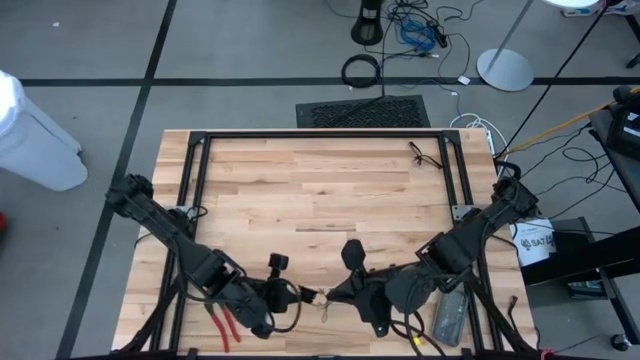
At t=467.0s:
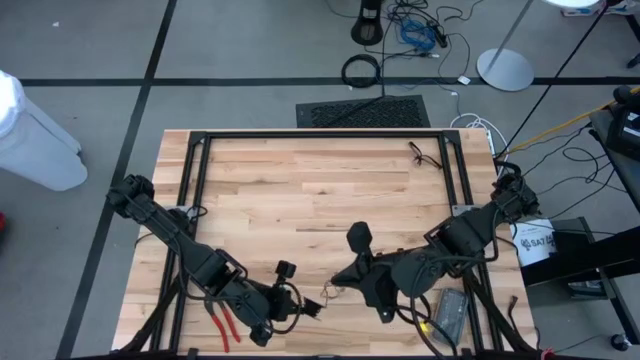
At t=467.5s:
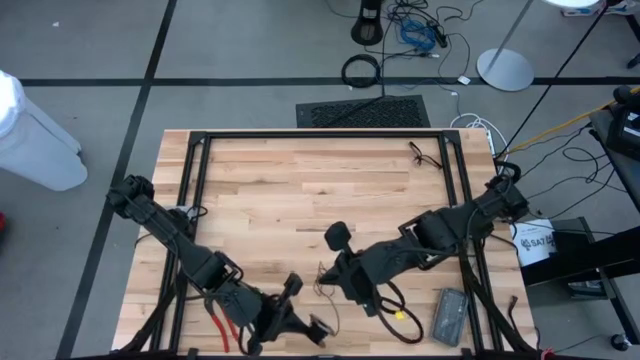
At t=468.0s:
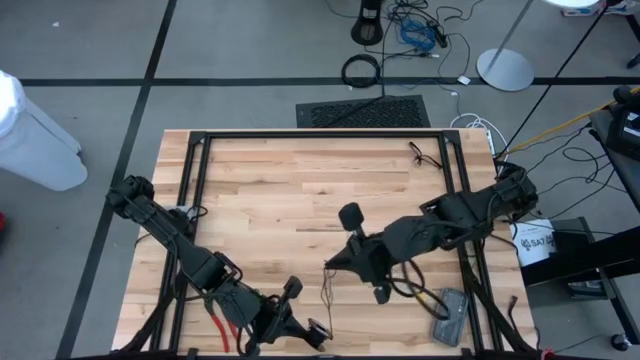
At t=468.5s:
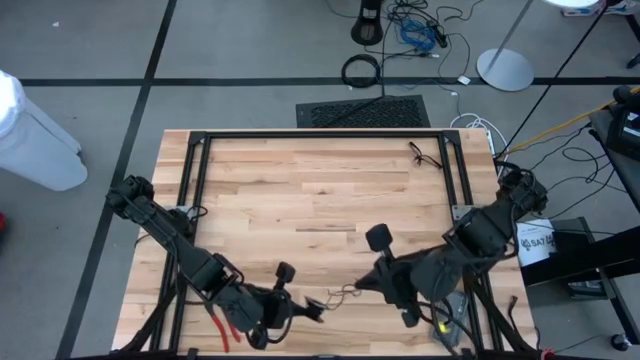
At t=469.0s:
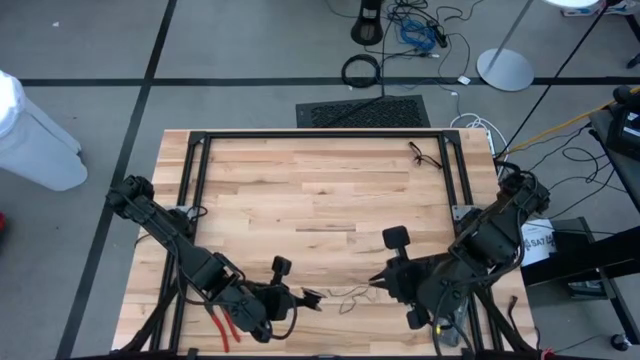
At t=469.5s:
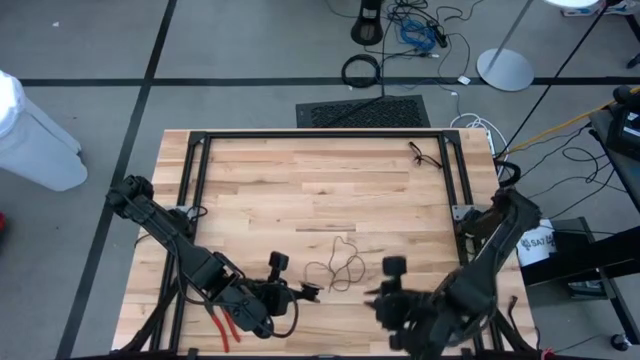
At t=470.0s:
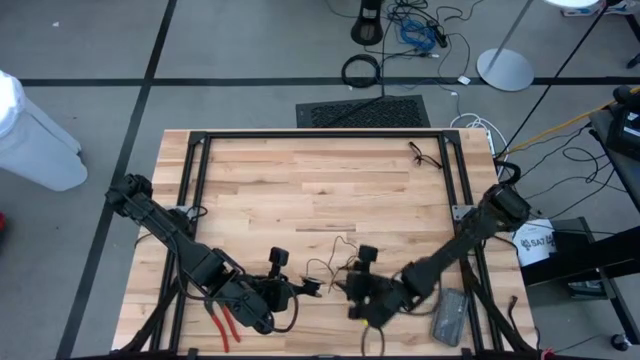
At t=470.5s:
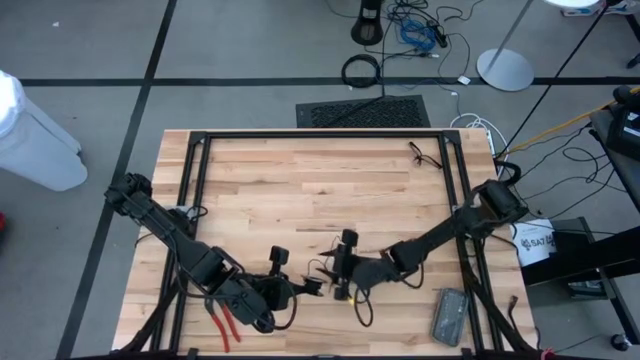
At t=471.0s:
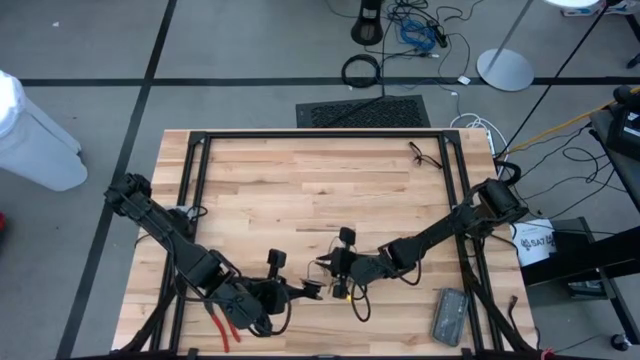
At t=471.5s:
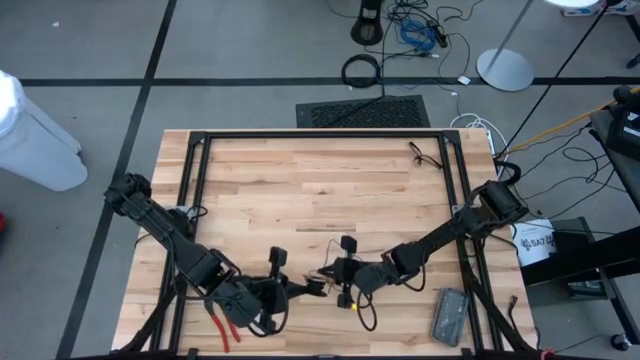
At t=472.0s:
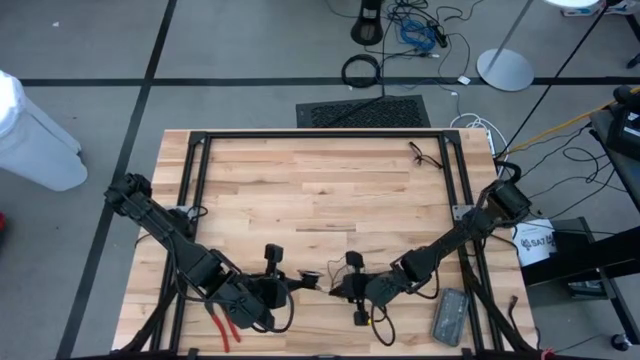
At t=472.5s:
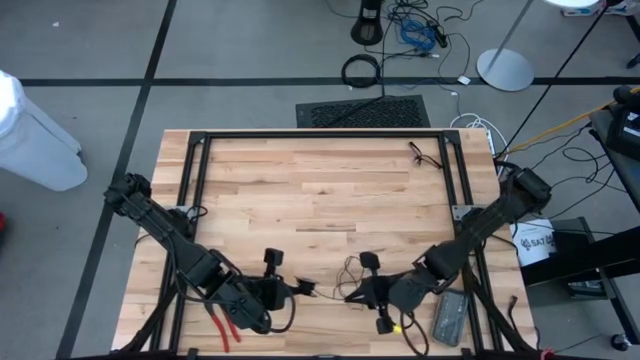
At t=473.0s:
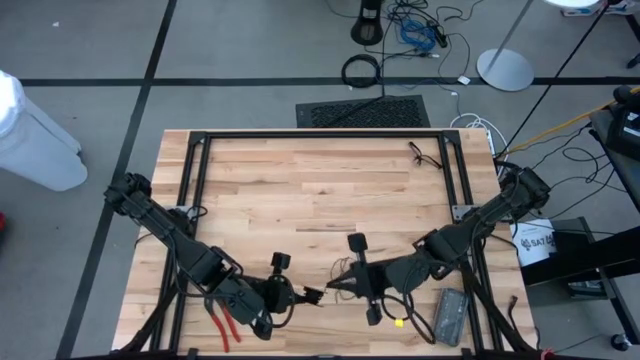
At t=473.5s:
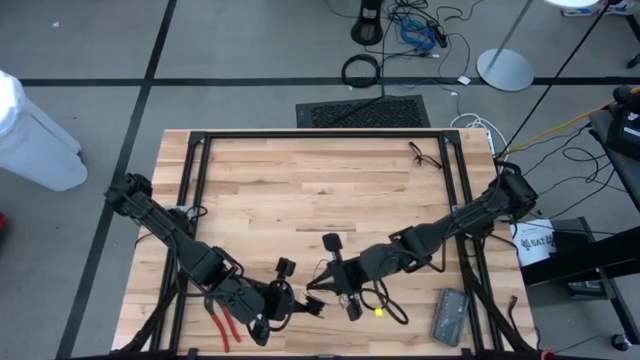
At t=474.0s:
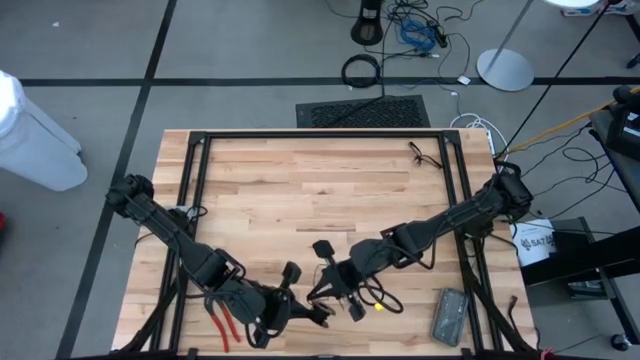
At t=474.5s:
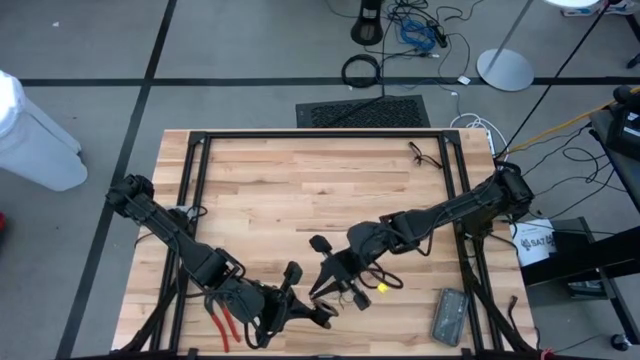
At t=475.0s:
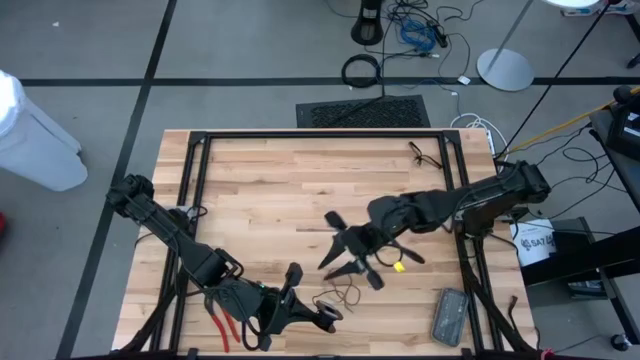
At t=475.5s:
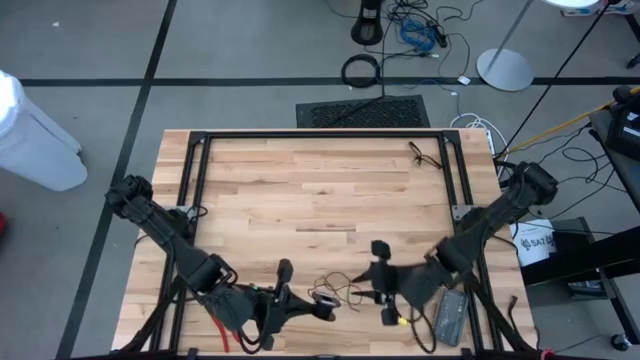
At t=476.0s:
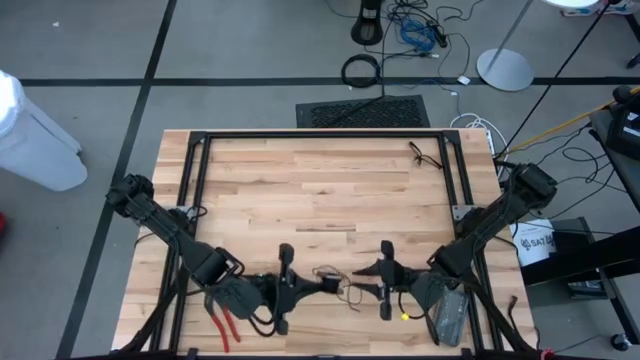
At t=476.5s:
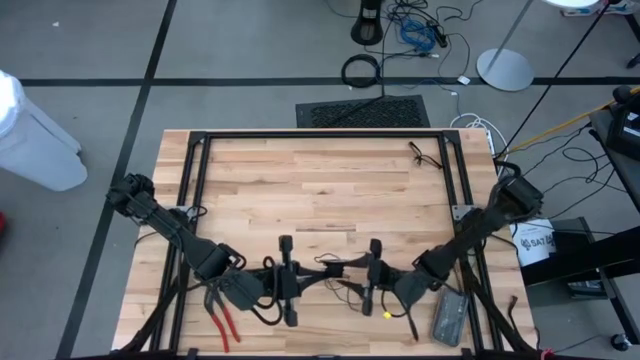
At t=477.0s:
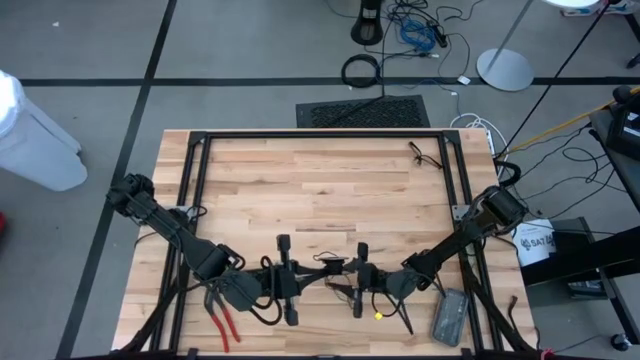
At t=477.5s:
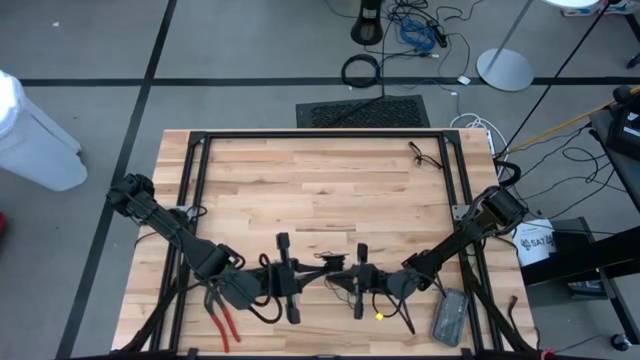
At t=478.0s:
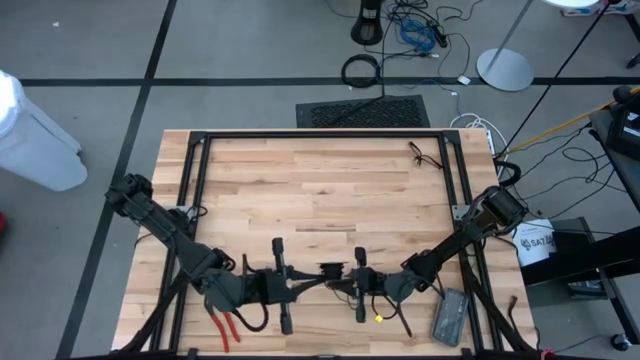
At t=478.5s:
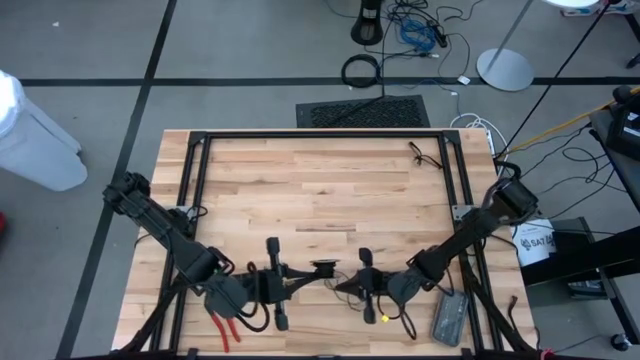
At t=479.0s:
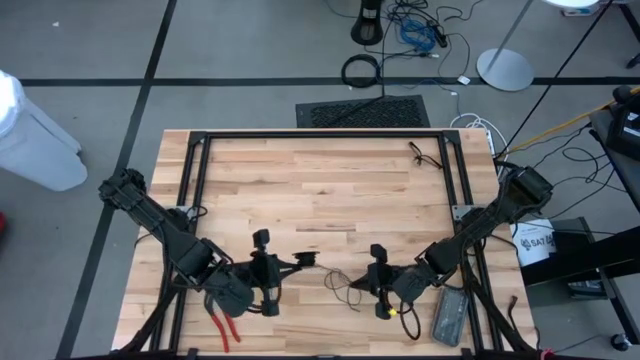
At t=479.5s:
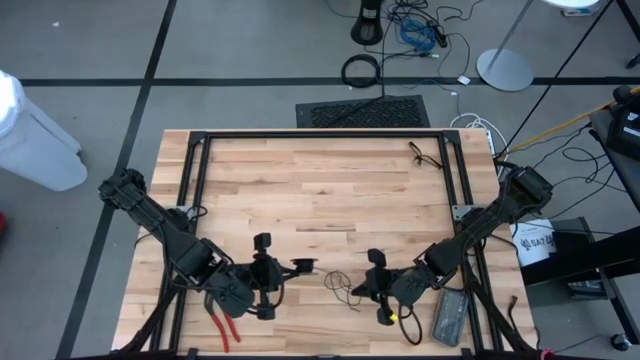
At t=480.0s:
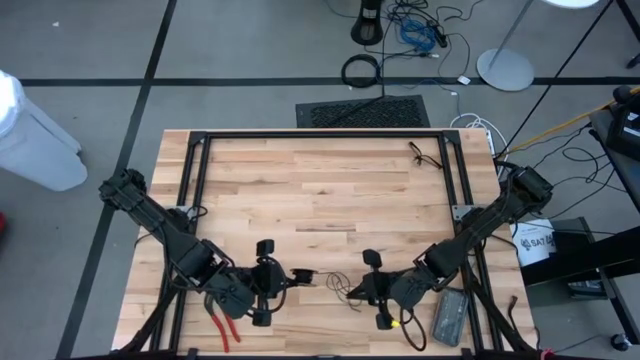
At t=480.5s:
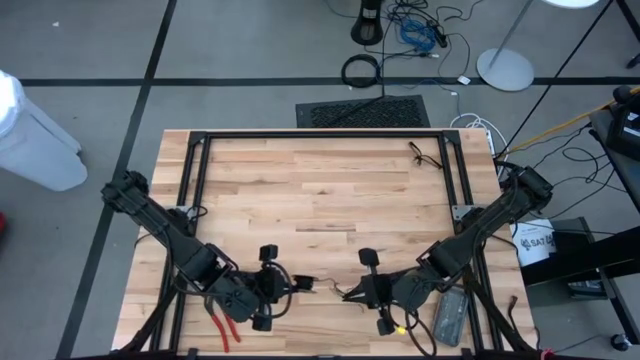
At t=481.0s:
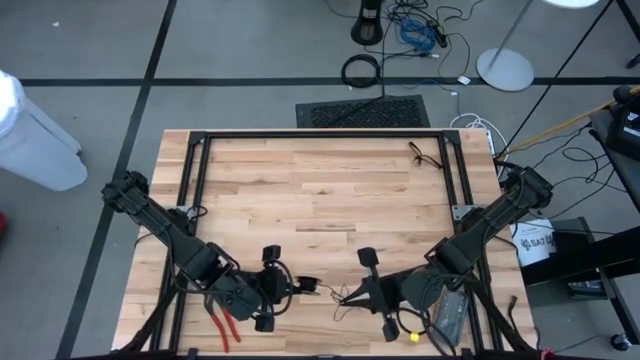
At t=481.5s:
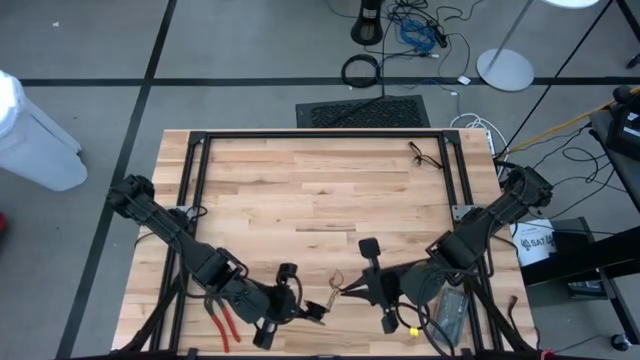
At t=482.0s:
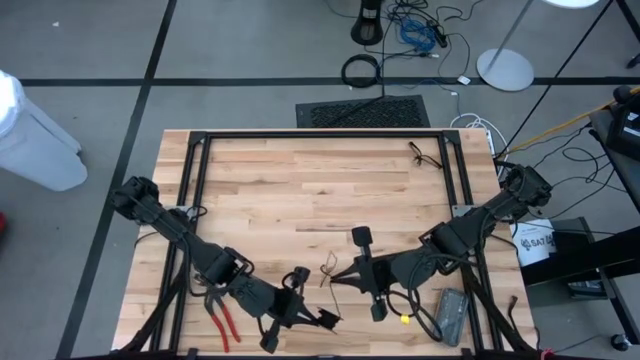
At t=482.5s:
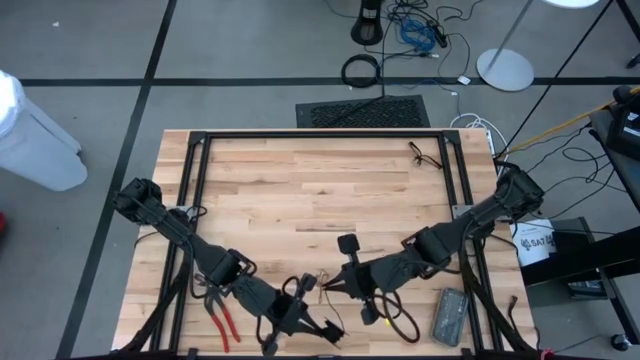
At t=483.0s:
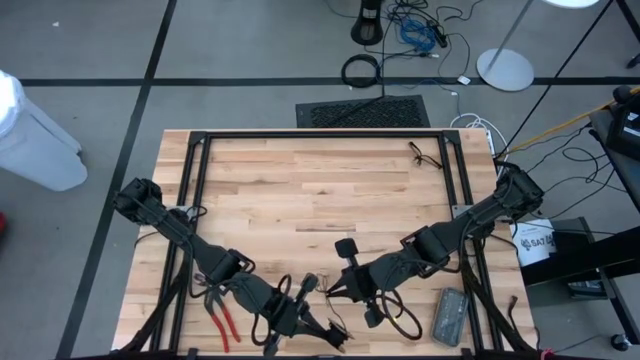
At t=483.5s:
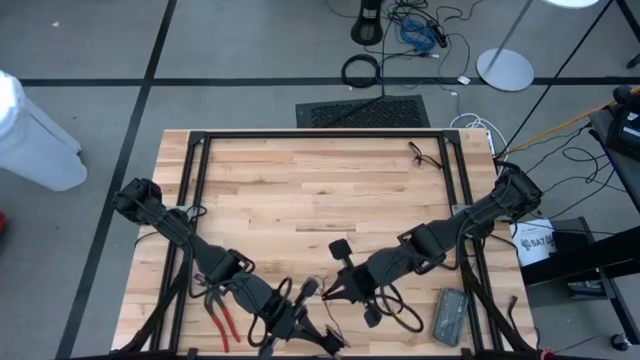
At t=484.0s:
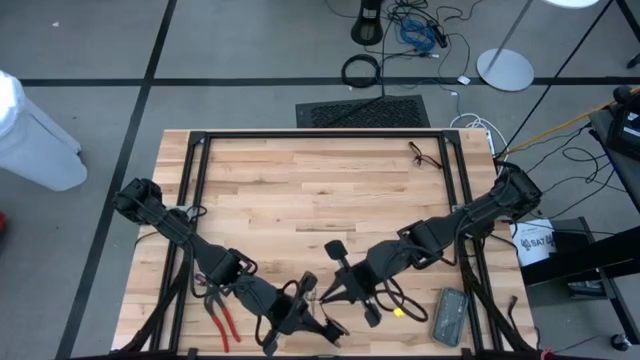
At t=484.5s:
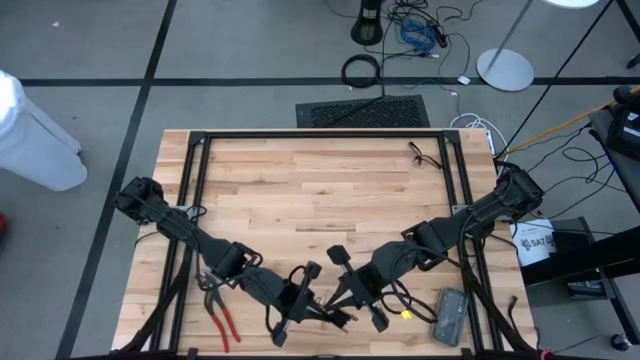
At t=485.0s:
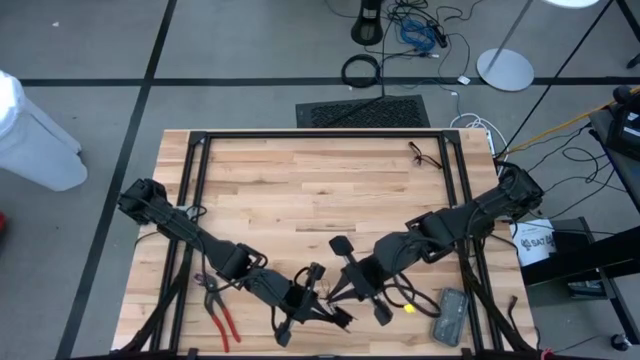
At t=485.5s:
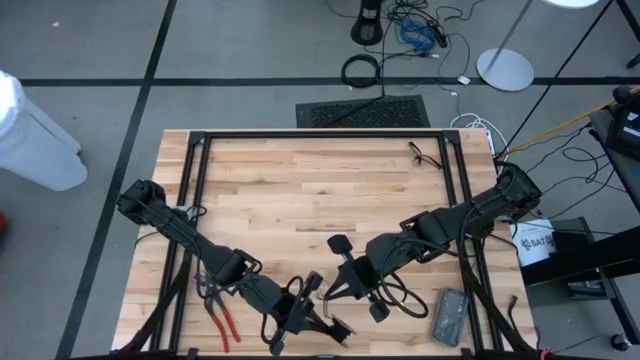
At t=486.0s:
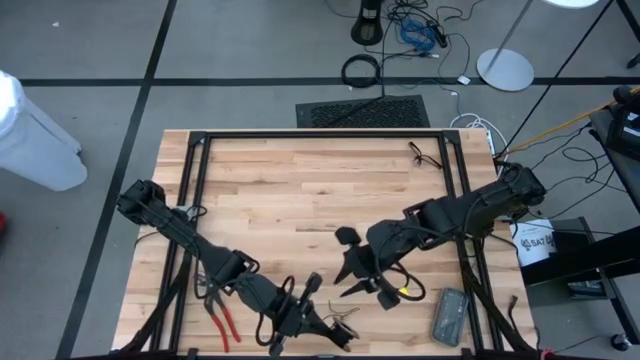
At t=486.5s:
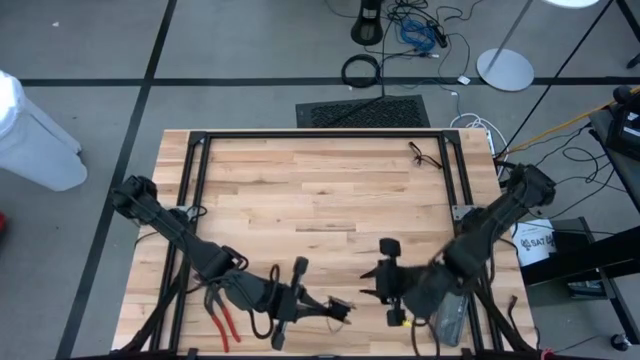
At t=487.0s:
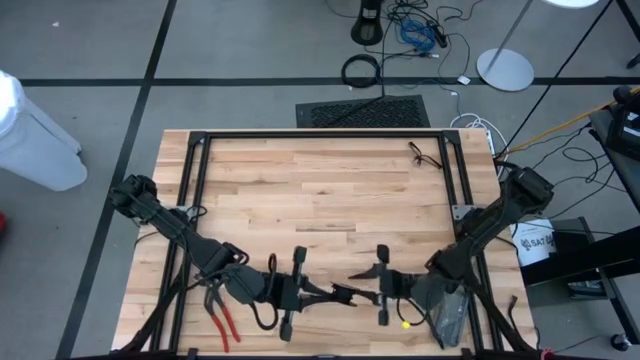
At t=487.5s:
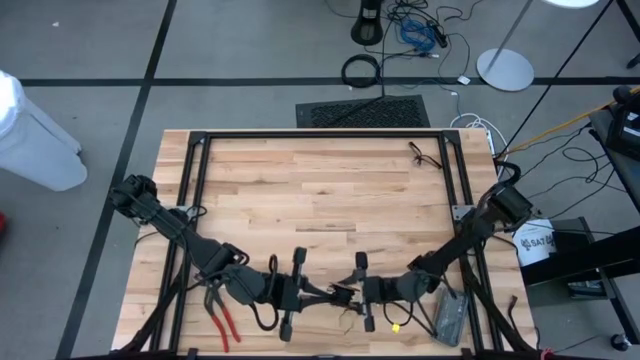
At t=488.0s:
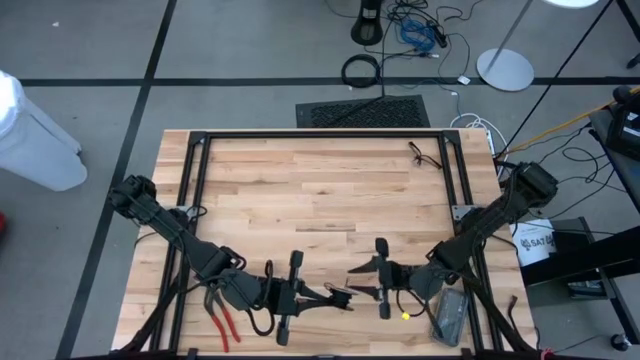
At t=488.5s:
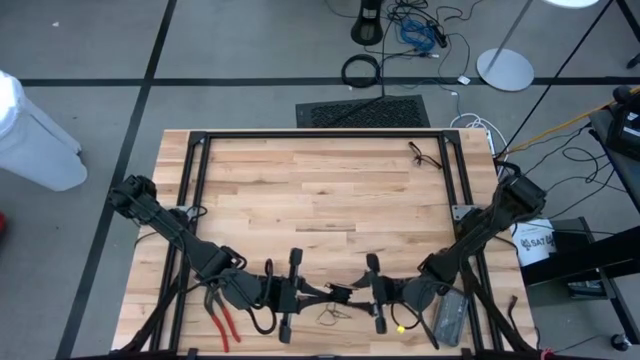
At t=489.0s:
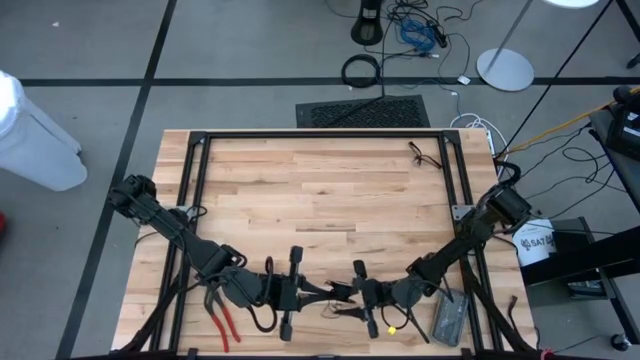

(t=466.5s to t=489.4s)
Task: Coil cords
Coil the black wire onto the black spool
